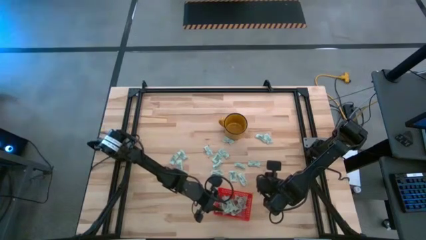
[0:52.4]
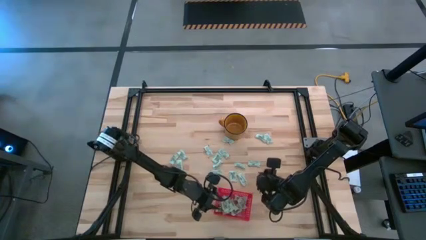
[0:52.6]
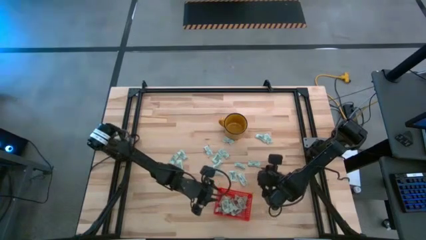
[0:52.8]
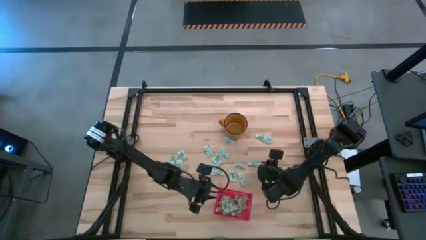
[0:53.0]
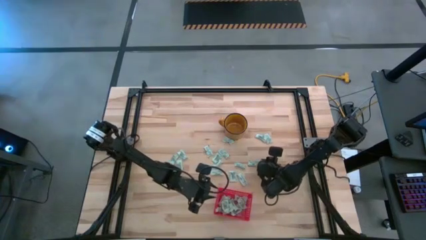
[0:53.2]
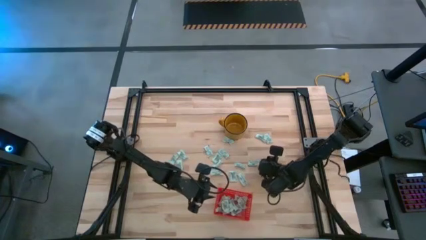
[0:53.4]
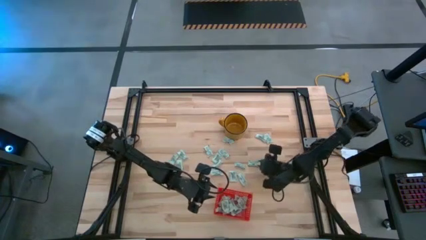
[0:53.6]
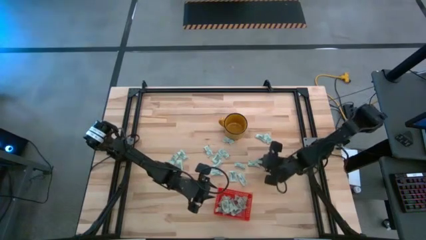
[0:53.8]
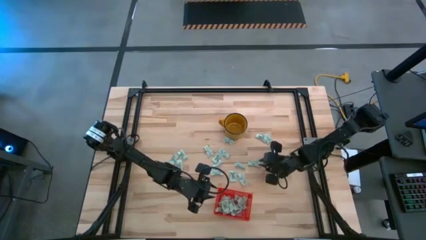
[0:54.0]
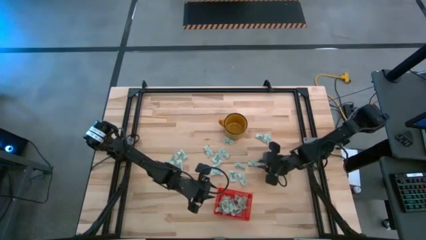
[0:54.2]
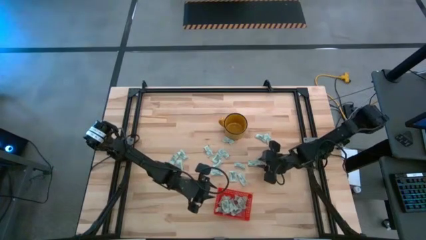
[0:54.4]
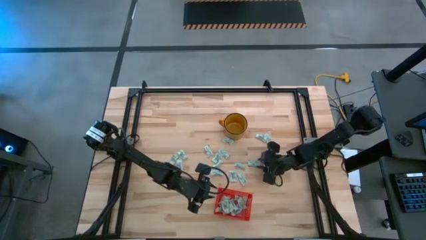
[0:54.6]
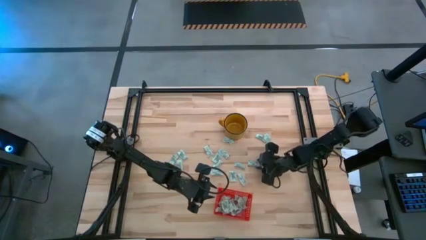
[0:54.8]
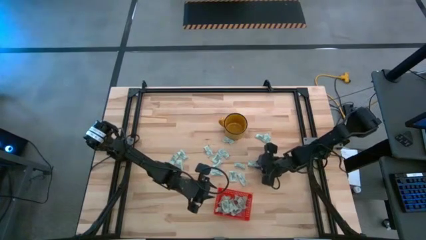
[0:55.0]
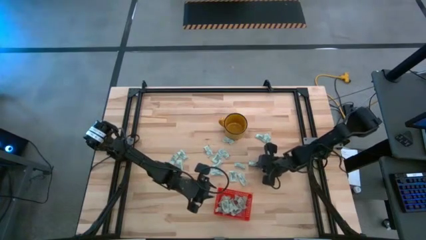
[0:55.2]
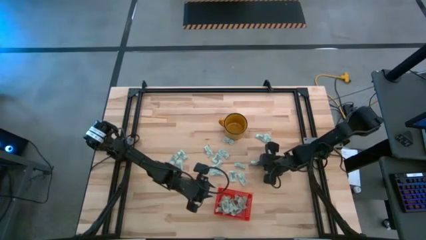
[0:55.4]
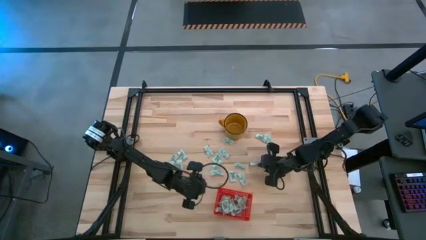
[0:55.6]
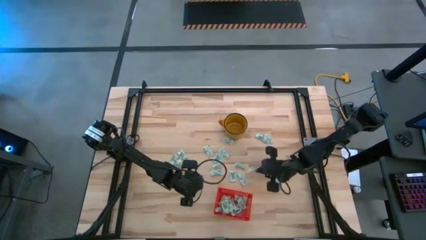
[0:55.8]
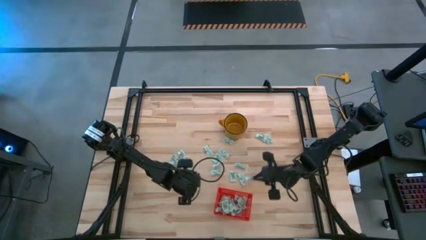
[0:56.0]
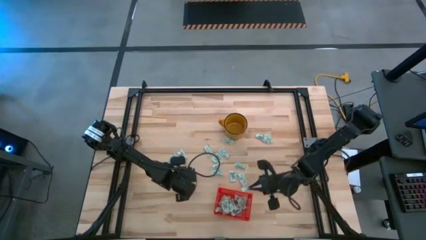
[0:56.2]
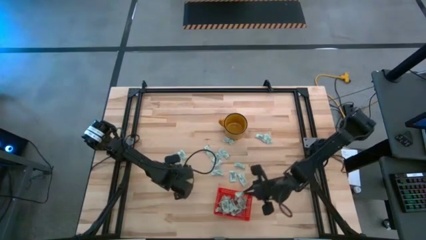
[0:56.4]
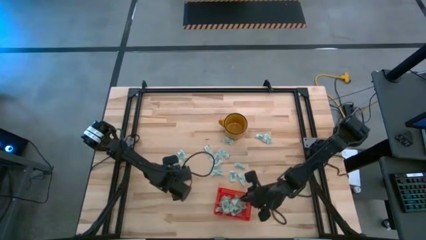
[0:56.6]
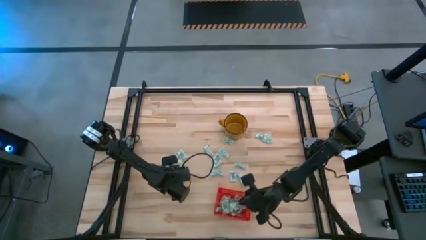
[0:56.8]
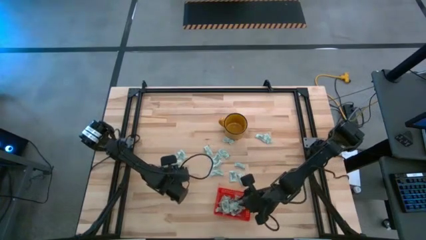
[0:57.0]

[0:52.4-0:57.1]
Task: Pick and place Stevia / Truvia into bins
Put the stevia packet into the bin

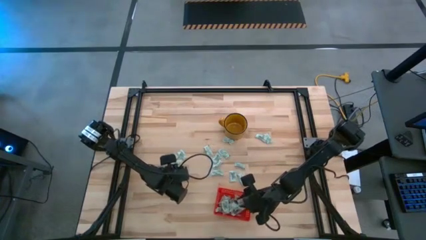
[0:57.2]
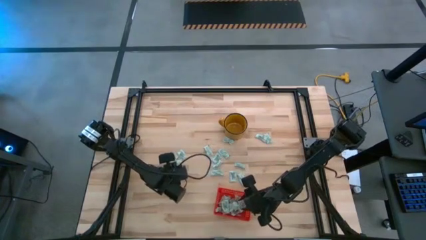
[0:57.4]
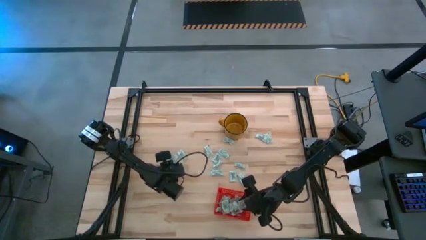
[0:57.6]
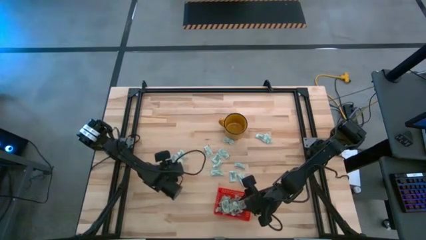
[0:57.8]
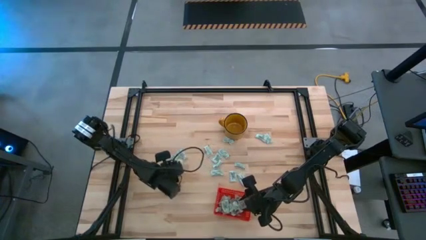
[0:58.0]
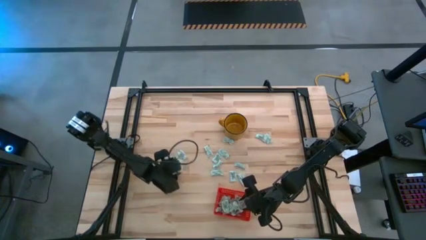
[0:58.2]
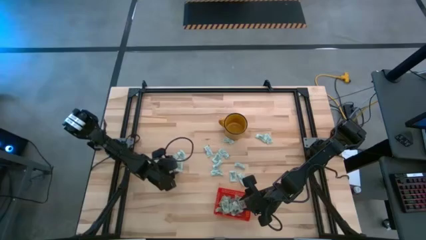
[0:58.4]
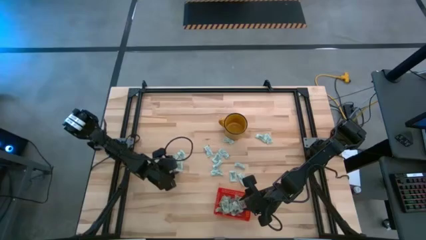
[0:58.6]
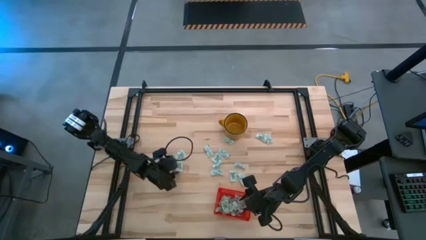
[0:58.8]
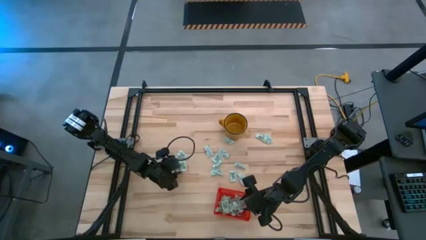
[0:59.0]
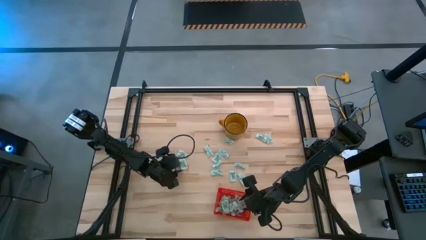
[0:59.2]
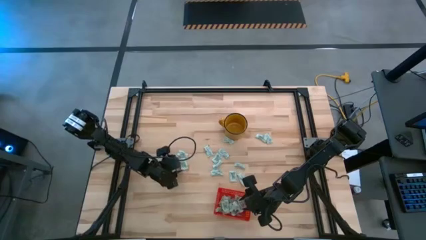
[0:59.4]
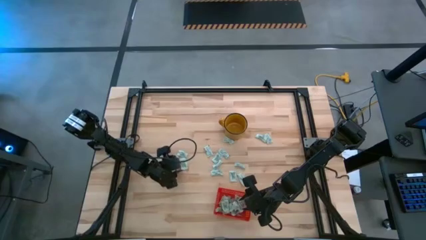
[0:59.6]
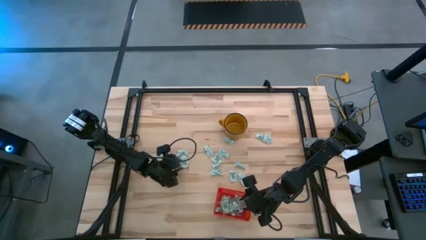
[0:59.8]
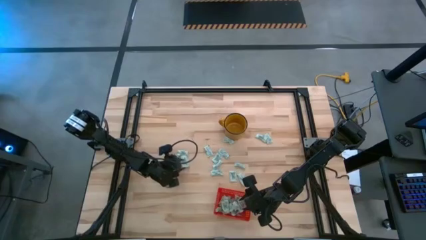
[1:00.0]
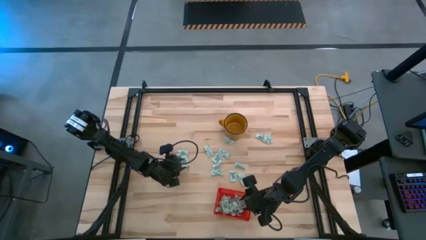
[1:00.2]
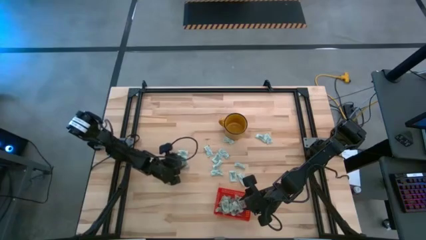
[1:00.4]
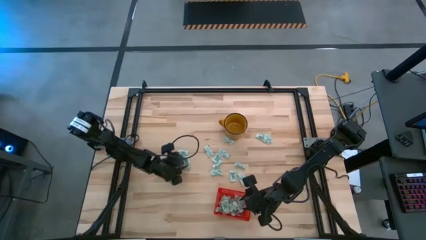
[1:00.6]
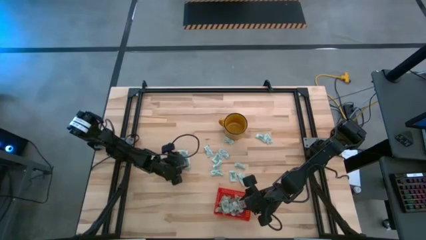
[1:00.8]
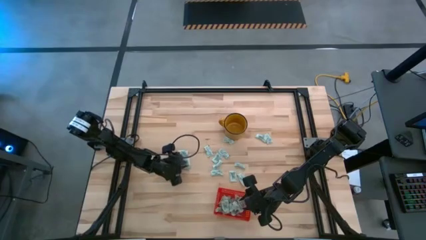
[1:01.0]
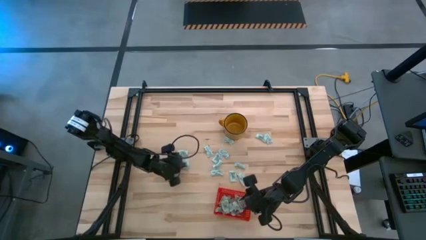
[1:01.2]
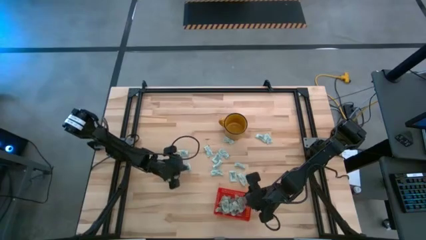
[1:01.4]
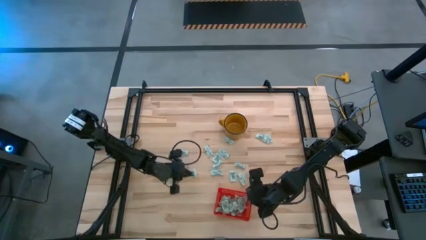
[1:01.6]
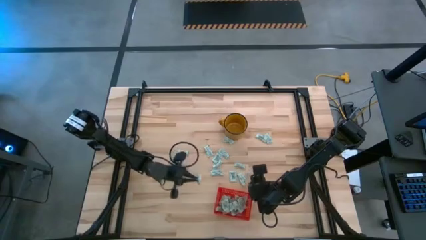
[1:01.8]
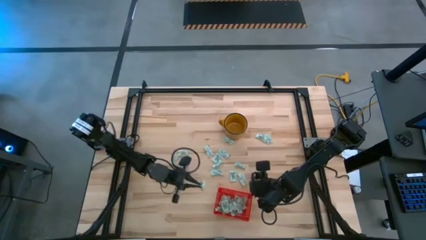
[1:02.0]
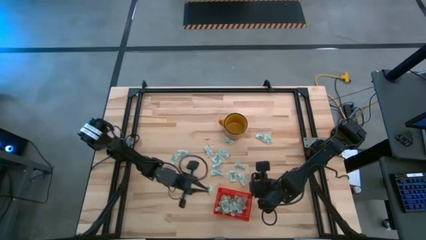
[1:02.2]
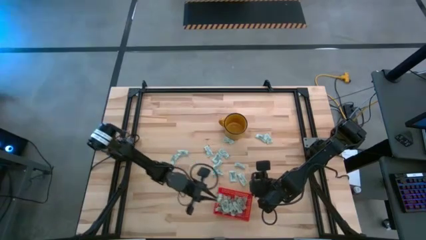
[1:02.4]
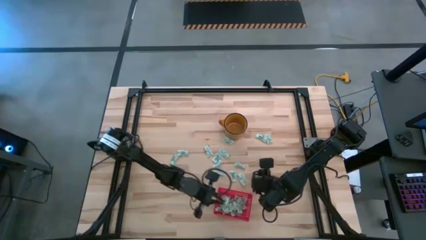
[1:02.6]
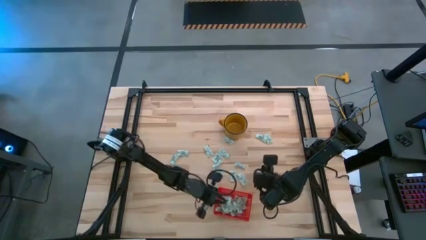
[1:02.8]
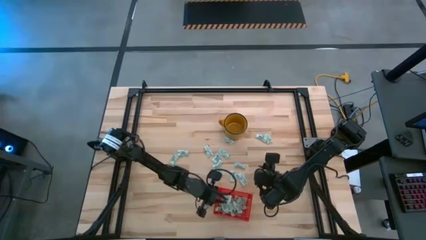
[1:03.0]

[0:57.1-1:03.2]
Put the stevia packet into the bin

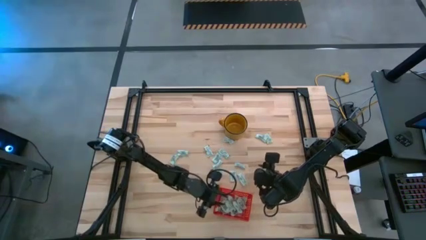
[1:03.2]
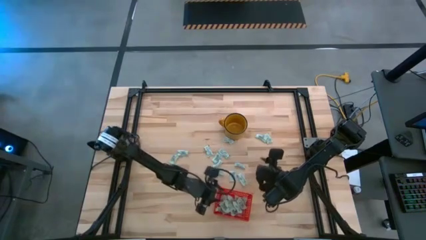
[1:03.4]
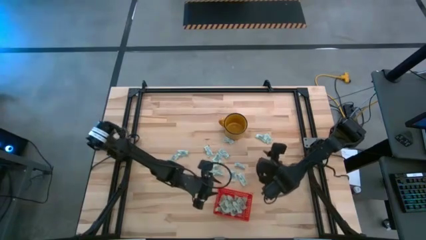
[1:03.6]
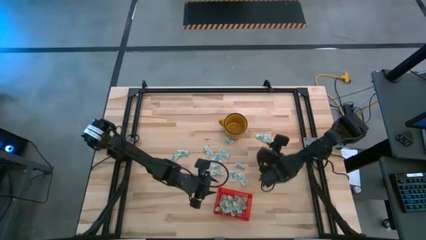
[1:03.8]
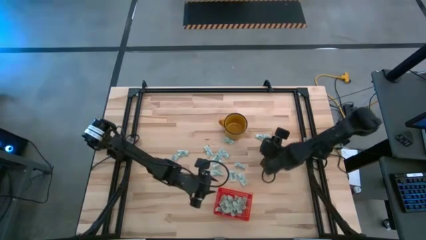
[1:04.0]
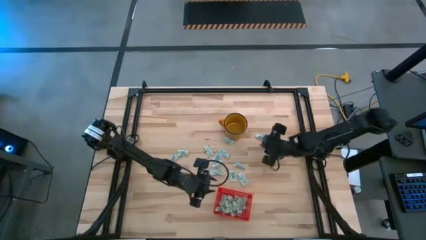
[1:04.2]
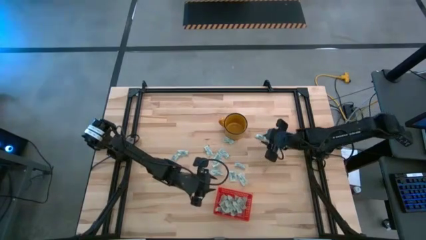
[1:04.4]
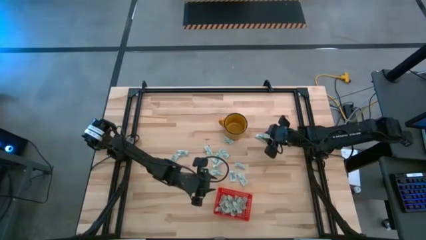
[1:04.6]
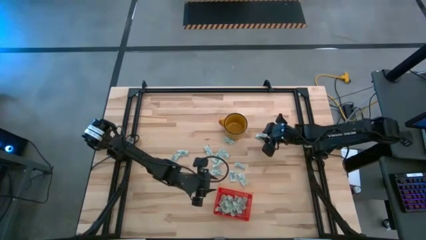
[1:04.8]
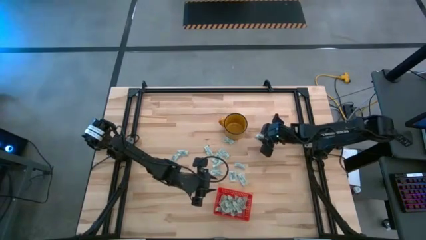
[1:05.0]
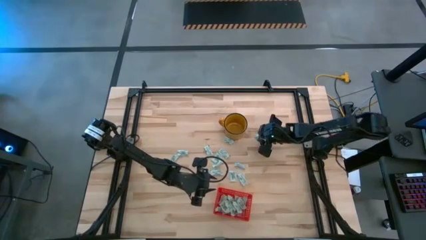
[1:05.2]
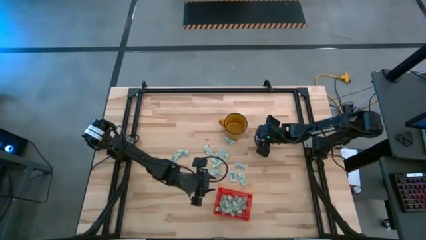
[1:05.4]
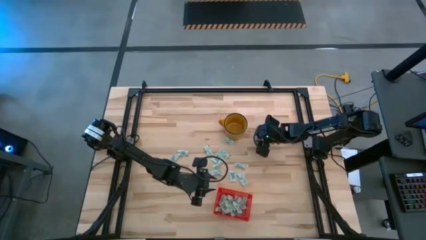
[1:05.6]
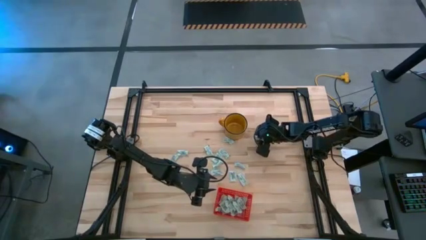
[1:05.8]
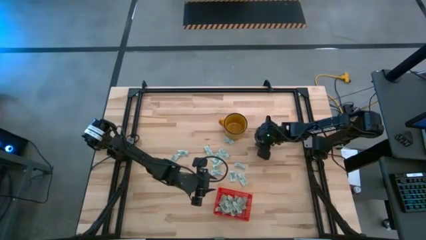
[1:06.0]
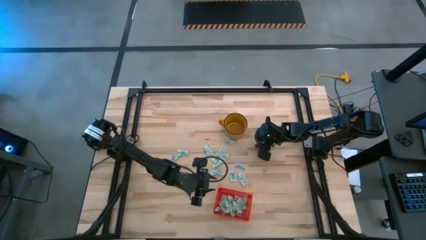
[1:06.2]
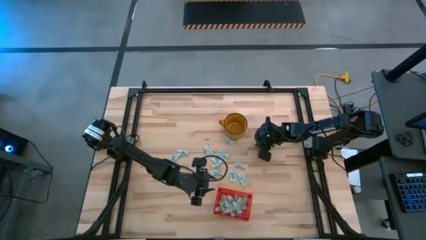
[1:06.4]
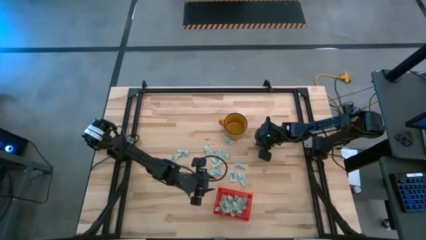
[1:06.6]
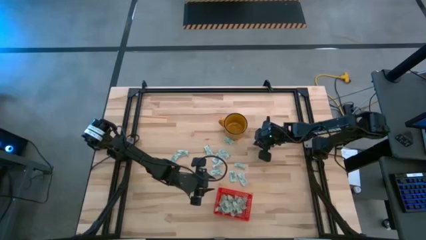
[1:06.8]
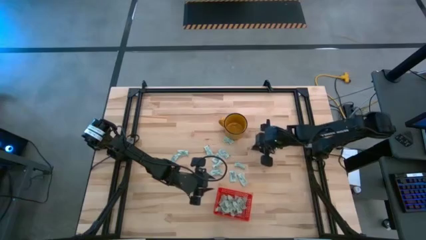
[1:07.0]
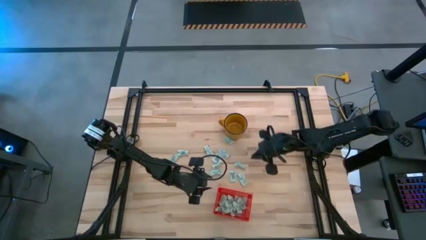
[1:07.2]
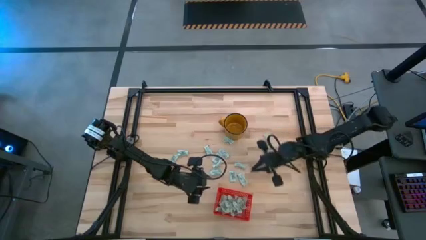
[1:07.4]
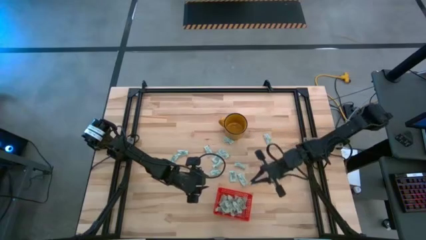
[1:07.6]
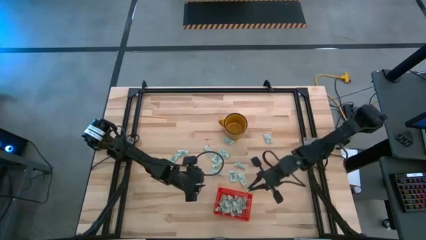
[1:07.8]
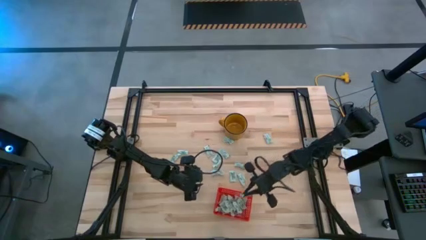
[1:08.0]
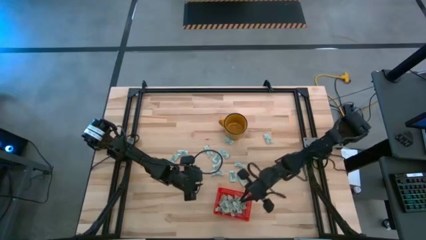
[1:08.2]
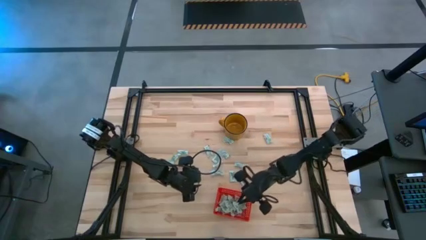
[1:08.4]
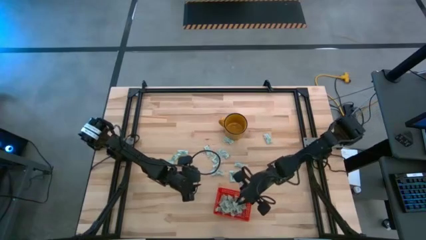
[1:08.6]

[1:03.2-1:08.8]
Put the stevia packet into the bin
